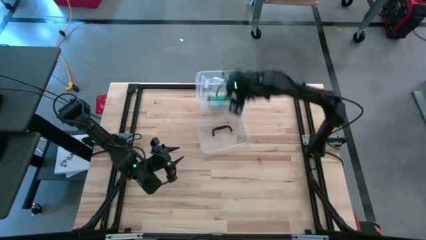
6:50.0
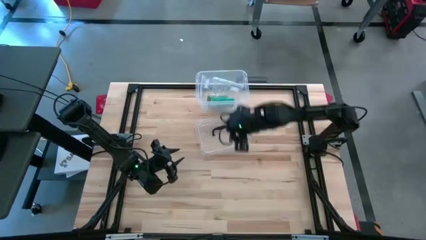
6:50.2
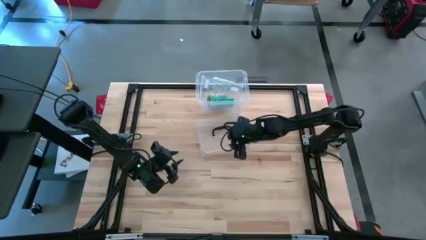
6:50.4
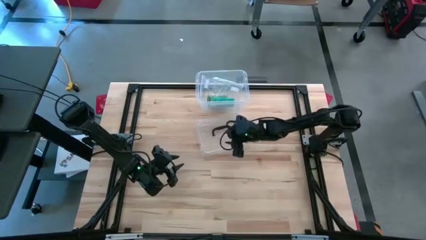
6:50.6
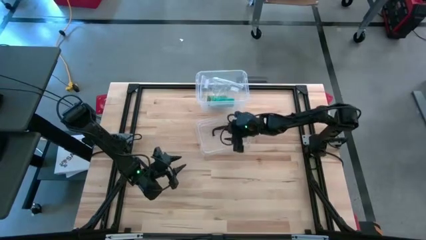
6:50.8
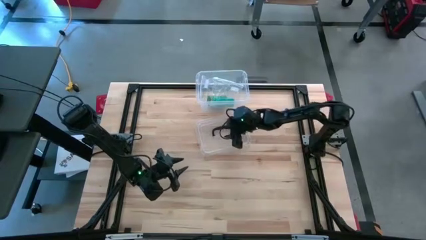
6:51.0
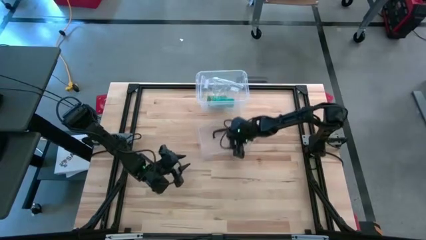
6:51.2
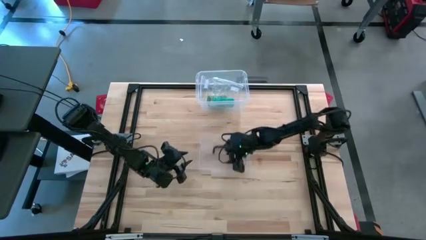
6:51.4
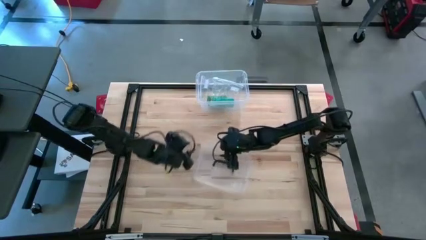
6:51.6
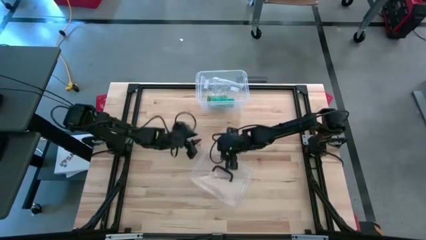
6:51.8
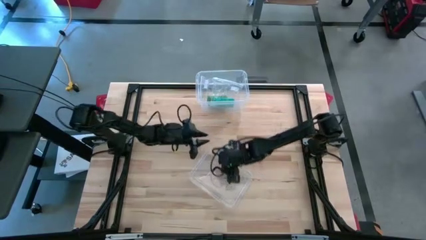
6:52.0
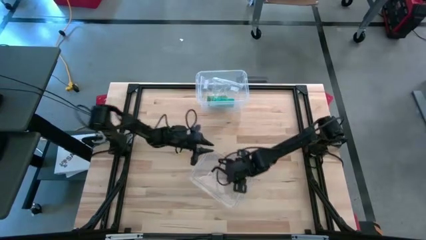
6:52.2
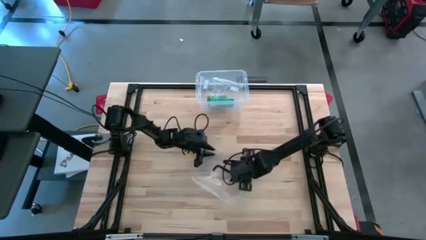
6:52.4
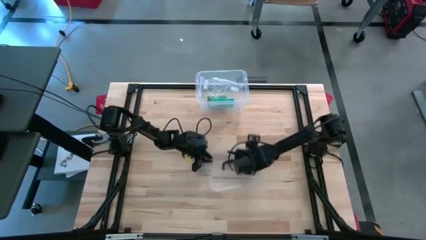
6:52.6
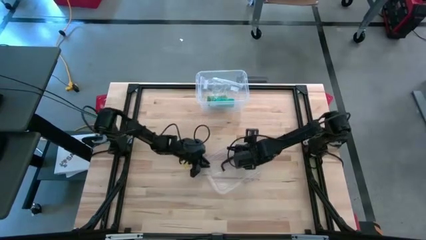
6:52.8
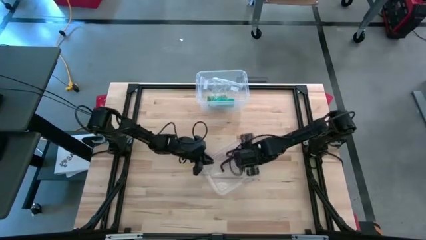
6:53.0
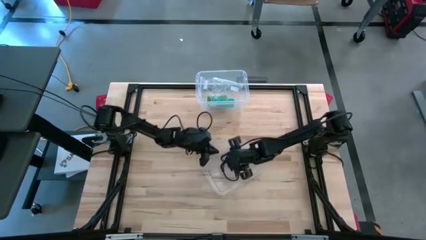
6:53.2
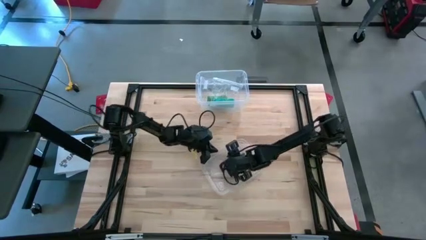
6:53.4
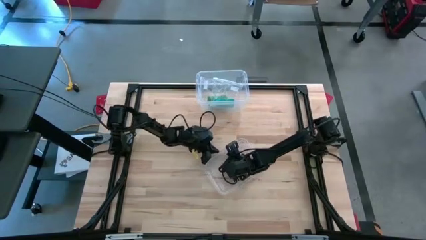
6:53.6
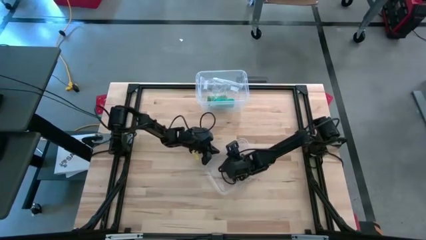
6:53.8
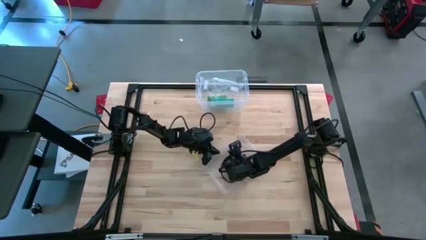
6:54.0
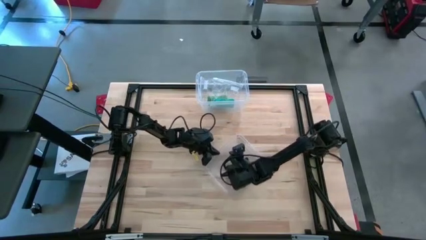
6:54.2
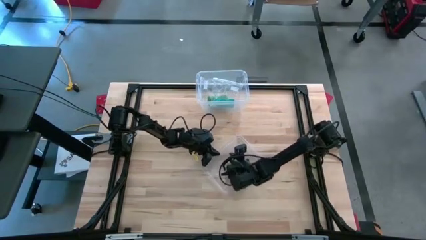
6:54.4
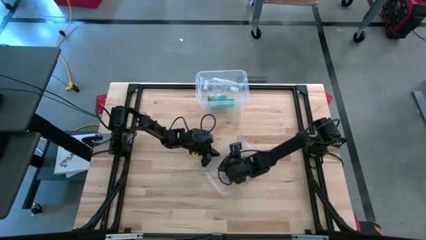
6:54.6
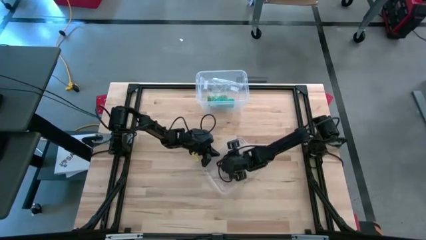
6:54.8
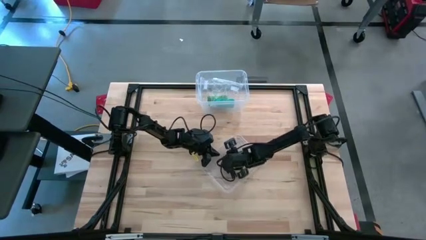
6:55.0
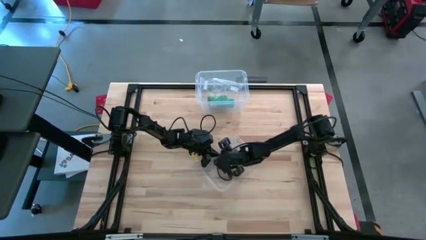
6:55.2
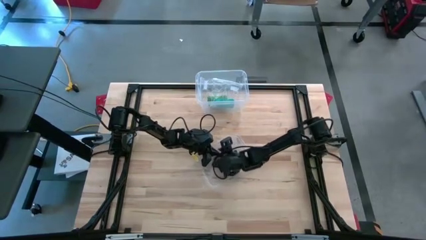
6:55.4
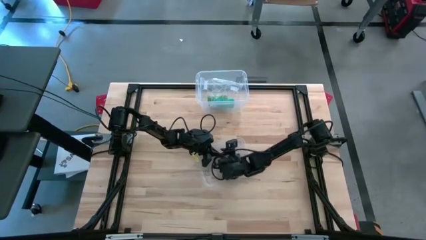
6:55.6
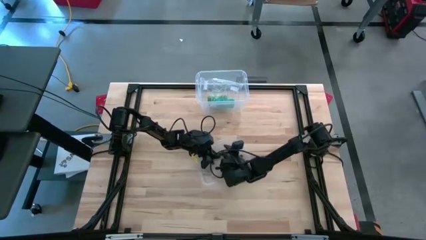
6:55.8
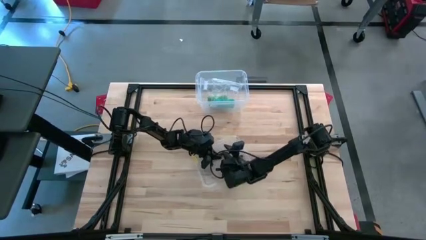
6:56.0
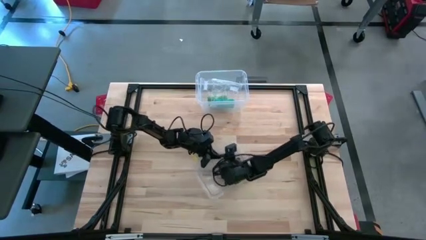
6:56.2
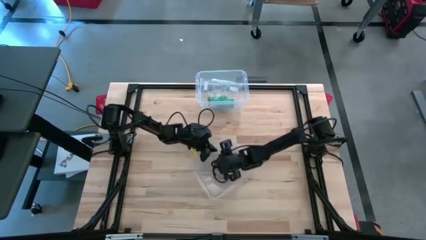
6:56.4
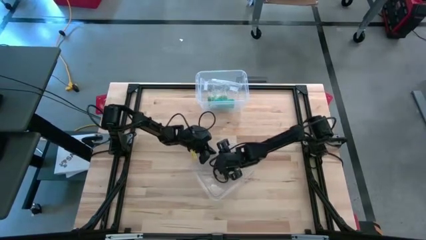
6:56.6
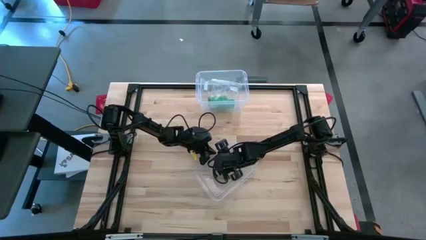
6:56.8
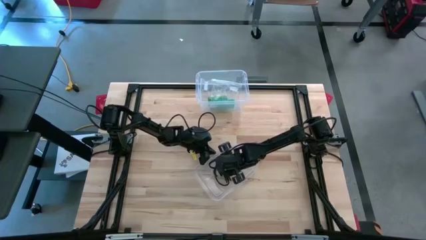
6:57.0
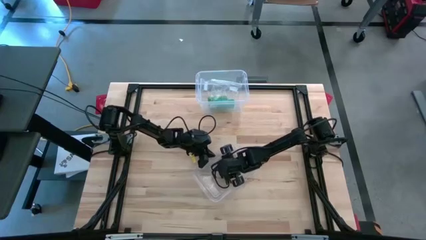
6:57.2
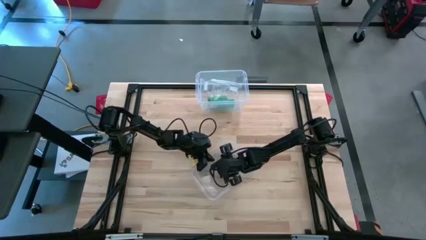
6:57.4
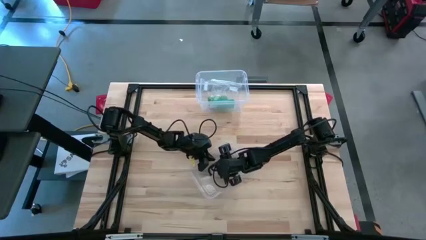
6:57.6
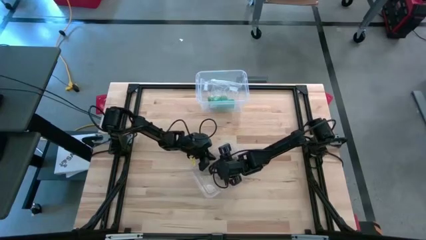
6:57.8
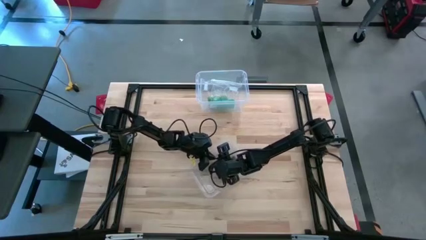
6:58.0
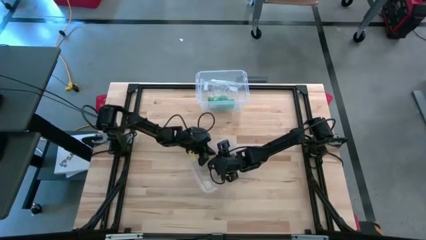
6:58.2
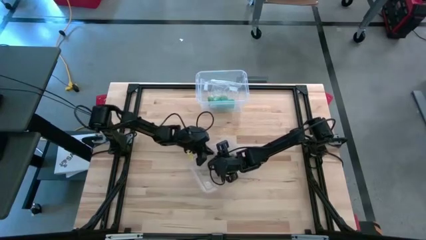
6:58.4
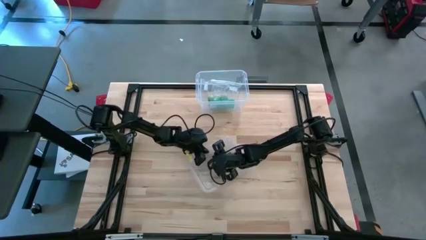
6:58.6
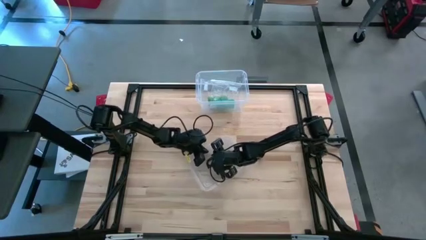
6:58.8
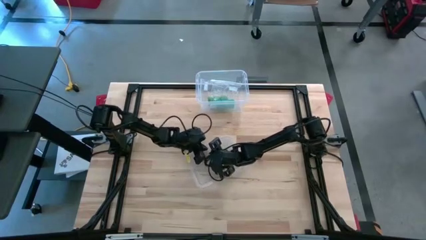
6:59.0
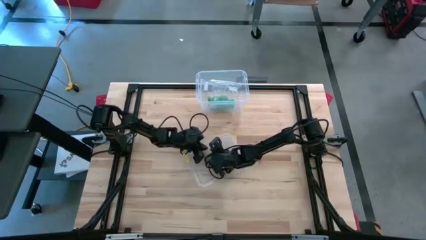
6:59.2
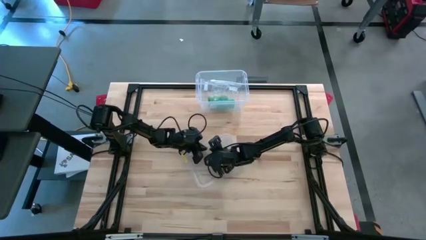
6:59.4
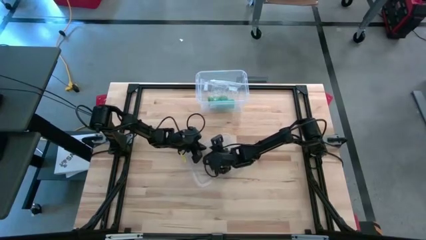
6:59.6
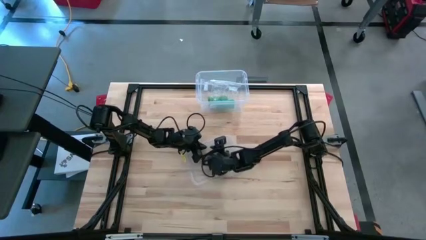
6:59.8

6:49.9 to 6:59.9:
Task: Roll bandage
Close the transparent bin

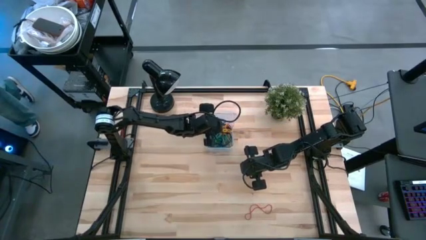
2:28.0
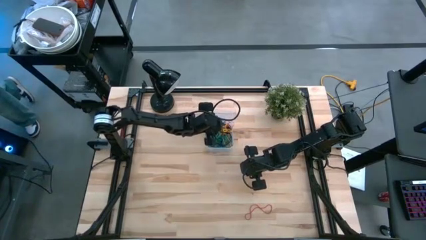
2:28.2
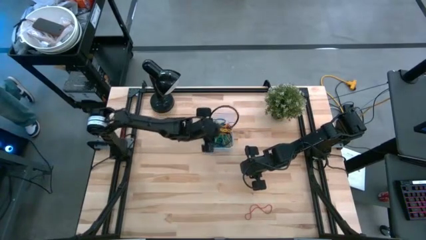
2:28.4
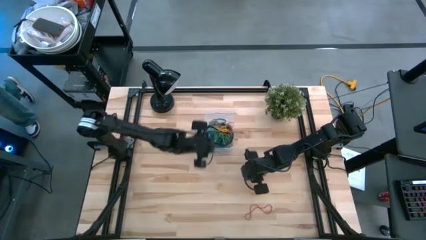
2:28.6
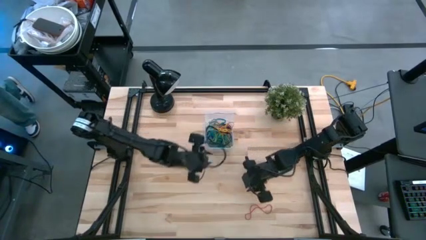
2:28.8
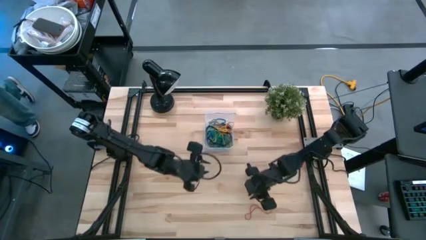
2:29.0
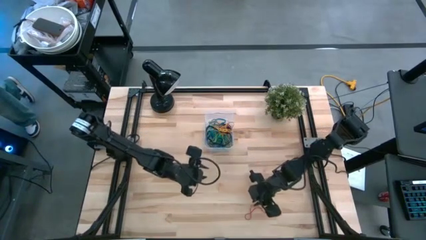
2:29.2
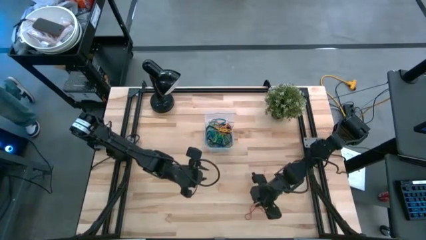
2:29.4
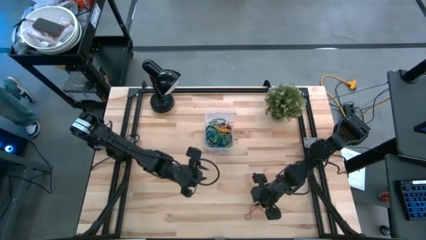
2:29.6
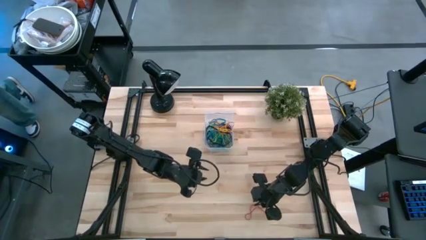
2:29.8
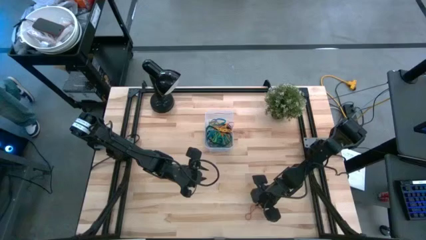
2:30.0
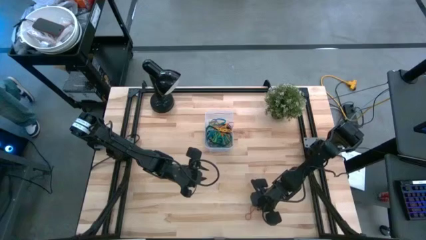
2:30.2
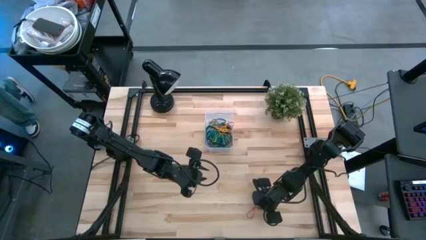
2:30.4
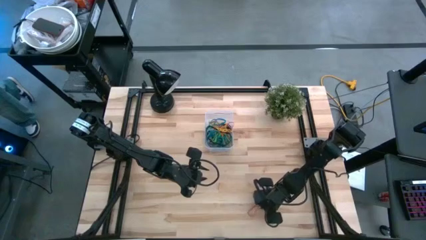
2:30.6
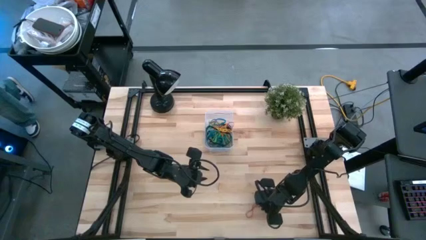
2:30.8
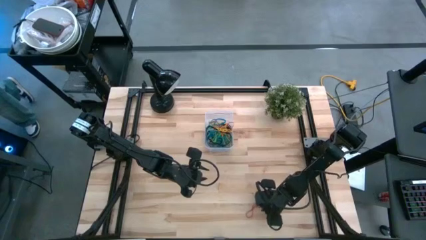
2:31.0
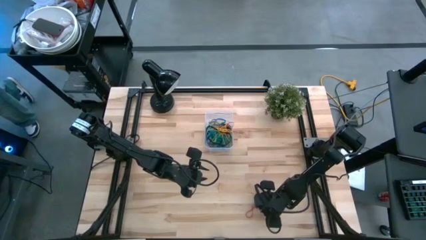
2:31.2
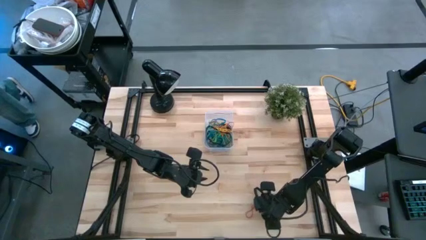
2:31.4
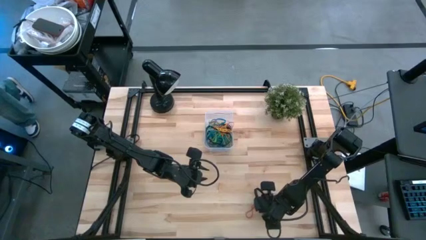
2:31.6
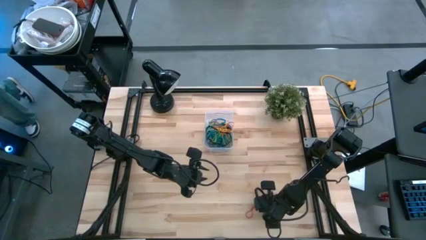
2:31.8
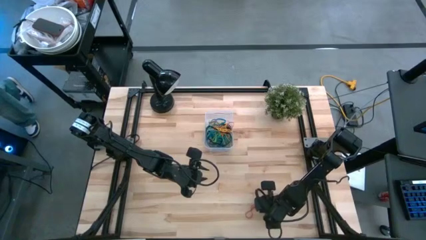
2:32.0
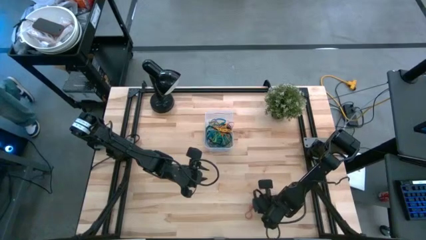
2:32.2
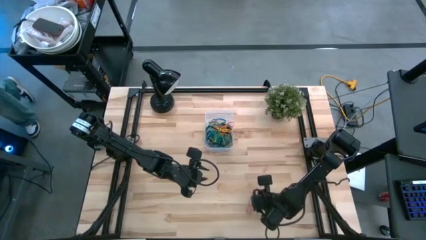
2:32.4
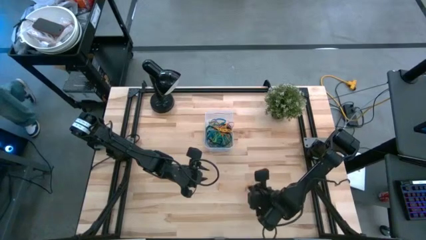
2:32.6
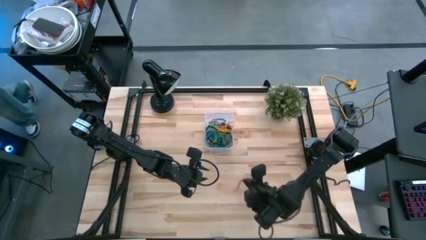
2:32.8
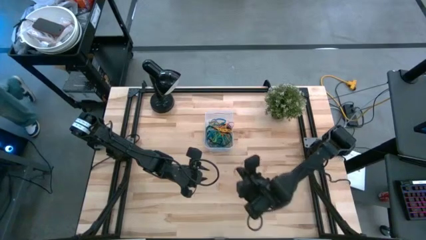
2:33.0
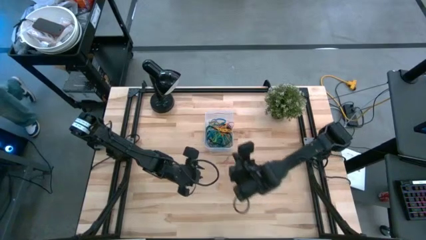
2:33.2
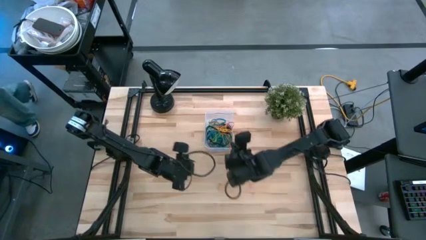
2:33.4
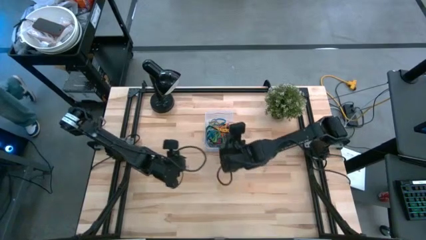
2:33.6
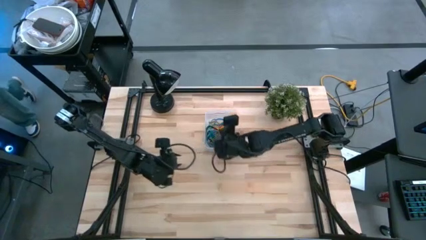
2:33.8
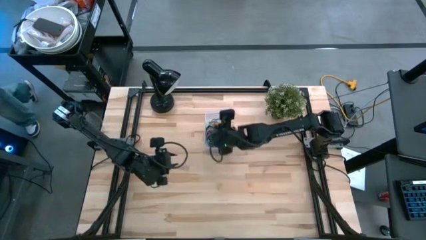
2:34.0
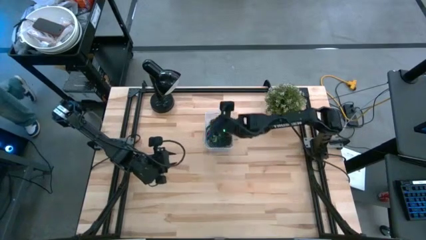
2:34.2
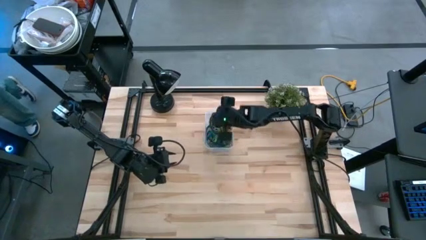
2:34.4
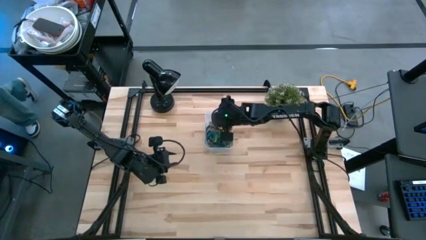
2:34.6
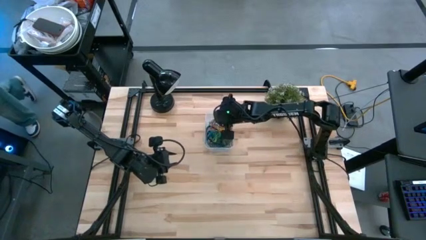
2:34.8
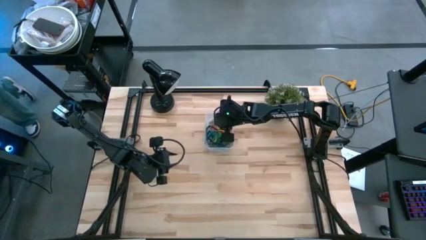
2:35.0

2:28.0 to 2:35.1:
Task: Pick and place rubber bands into bin
Put red rubberband into the transparent bin
